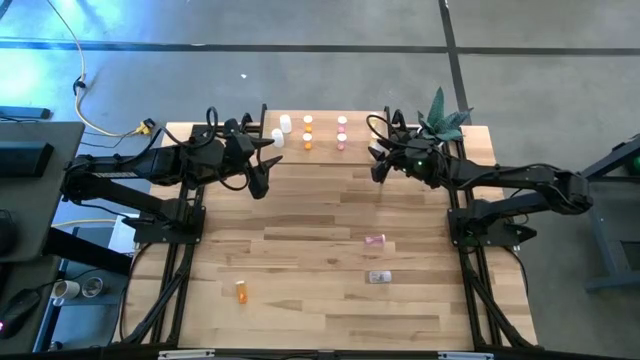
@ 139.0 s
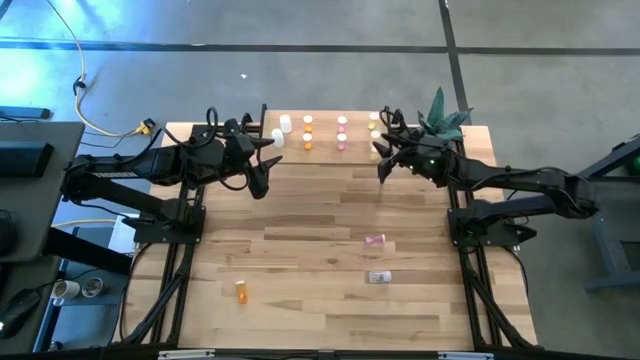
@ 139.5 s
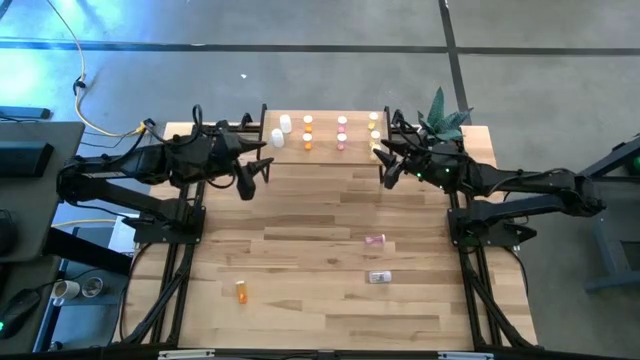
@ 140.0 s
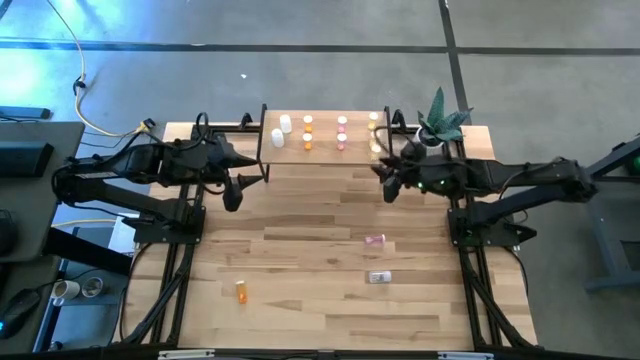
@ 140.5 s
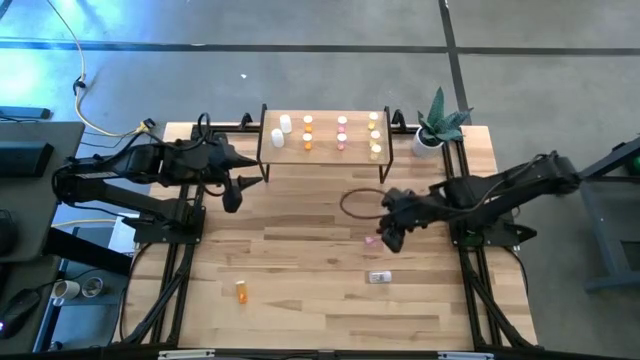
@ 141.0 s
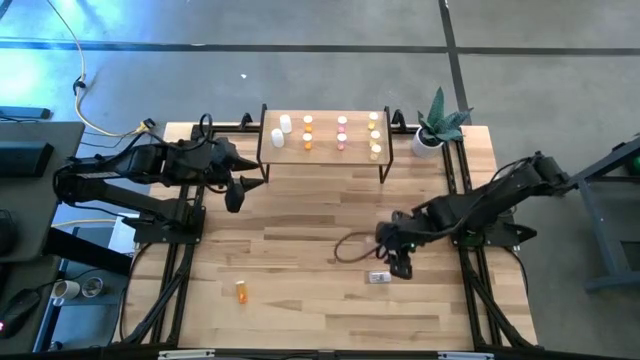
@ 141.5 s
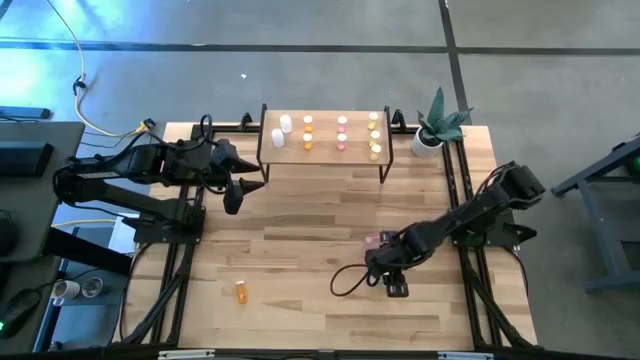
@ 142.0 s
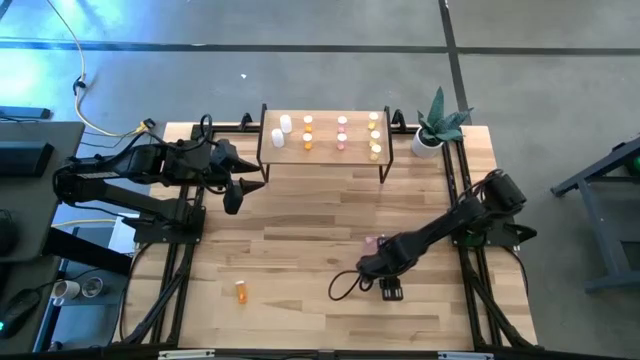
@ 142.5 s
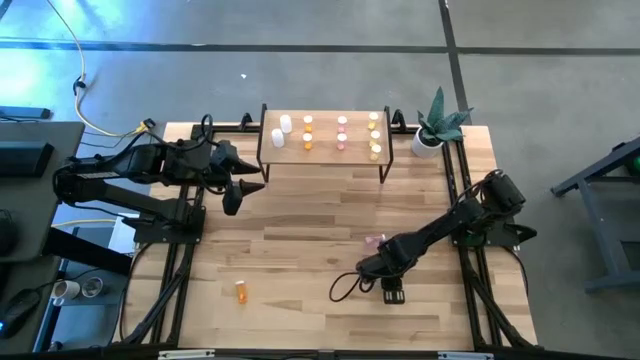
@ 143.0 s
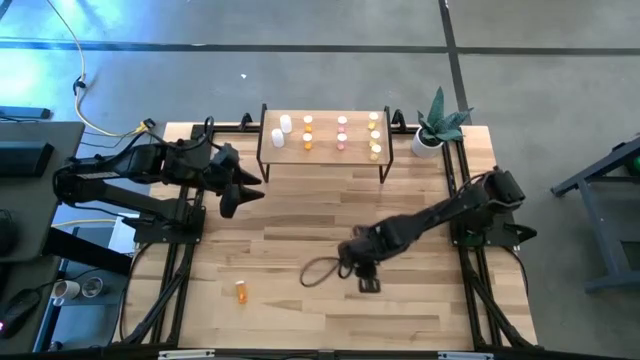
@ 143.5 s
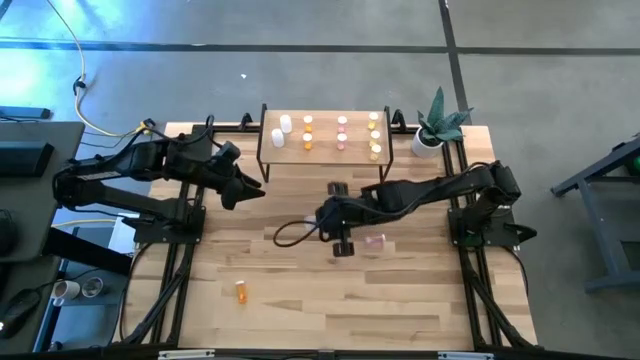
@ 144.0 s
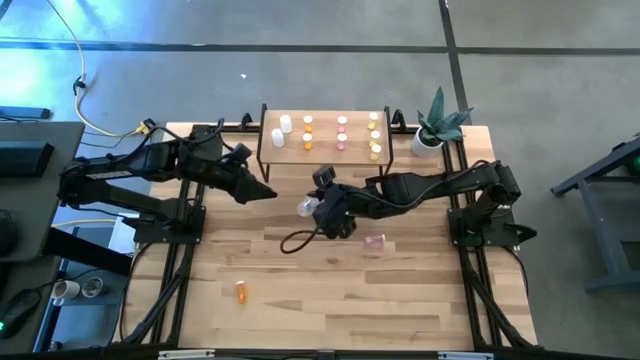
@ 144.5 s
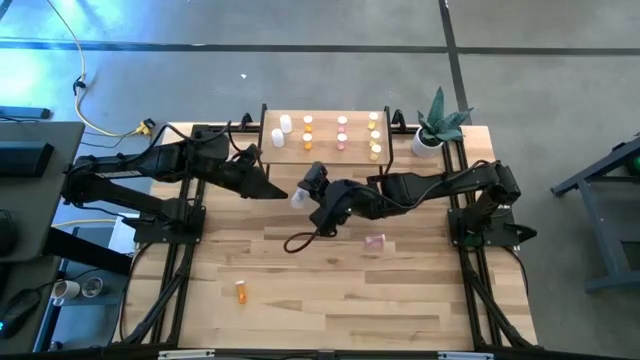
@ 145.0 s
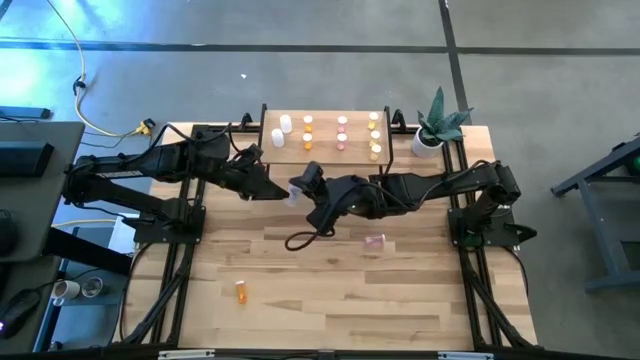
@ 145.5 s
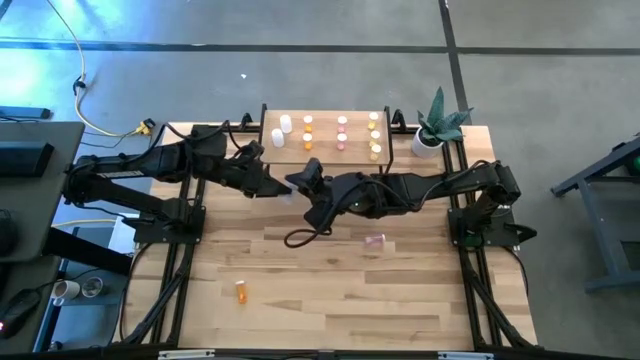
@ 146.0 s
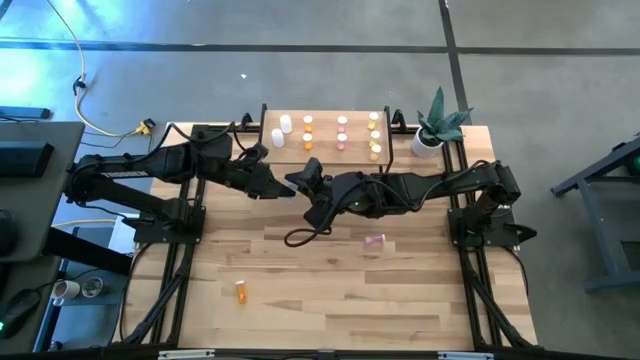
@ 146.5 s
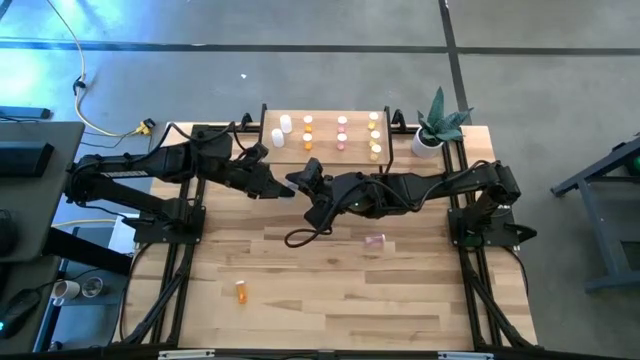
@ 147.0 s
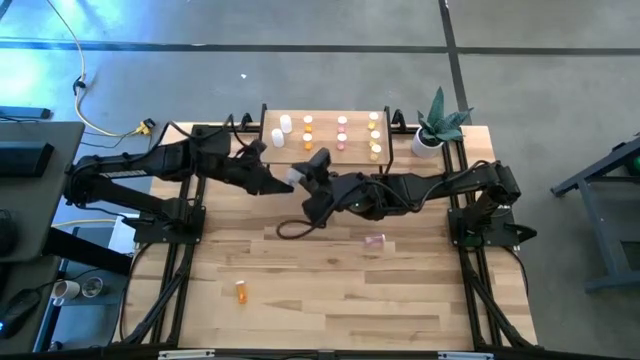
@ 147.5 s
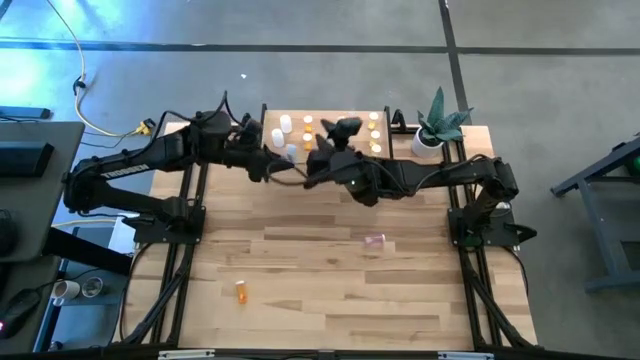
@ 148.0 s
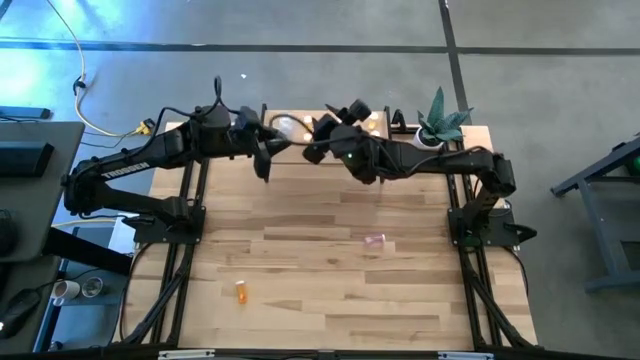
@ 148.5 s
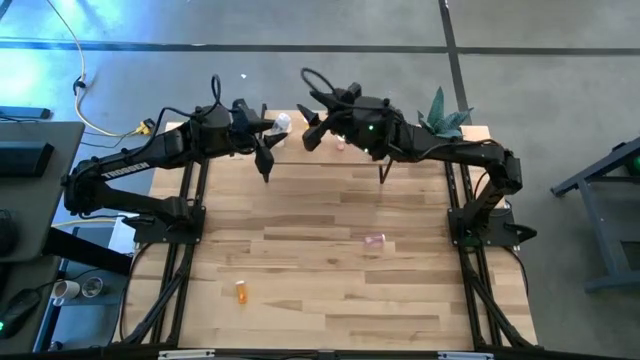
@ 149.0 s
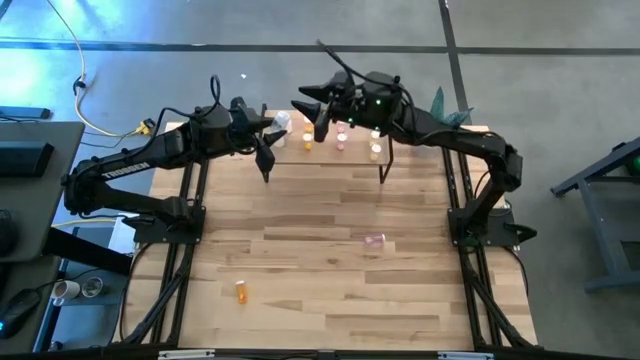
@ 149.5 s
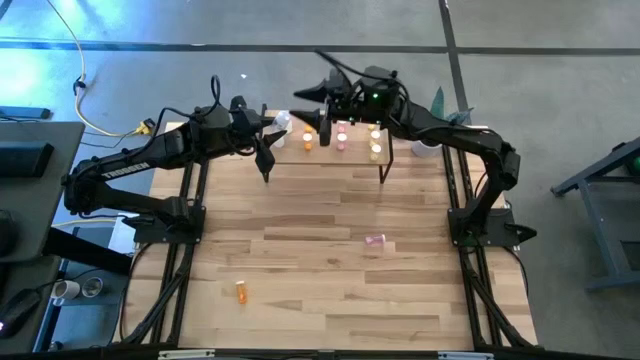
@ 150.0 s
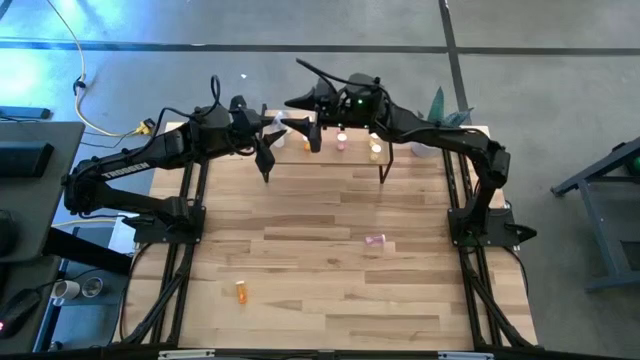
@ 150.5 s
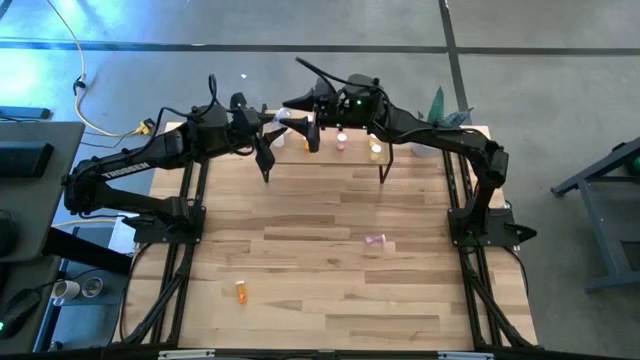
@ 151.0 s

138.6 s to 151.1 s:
Task: Pick and place medicine bottles onto shelf by color
Put the transparent pill bottle aligned with the other transparent pill bottles on the shelf

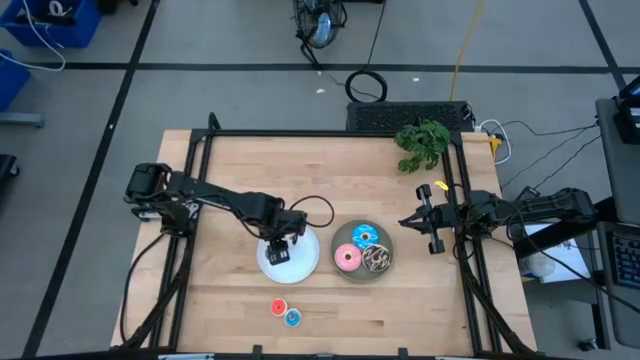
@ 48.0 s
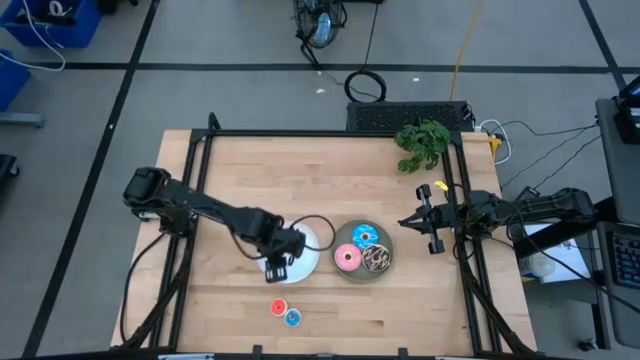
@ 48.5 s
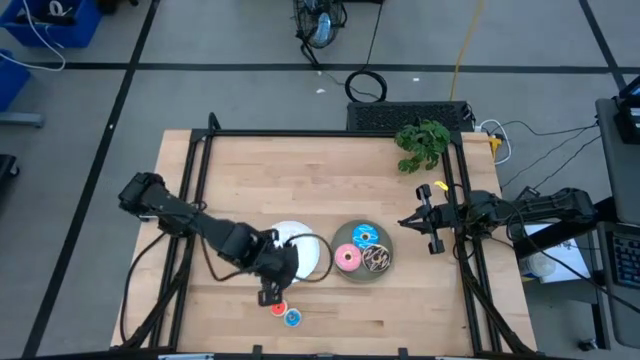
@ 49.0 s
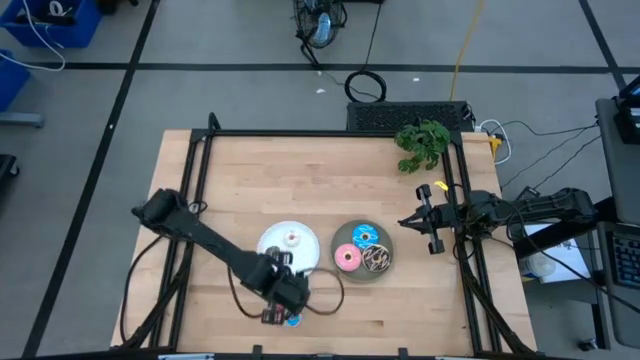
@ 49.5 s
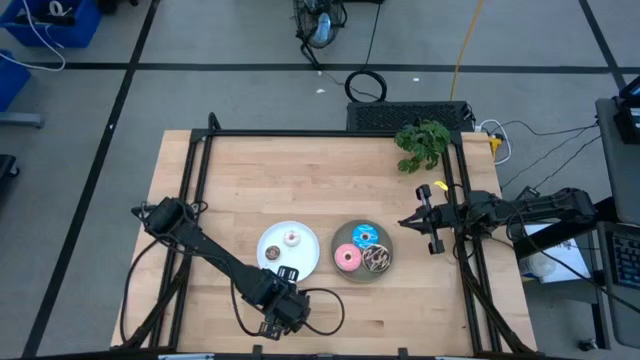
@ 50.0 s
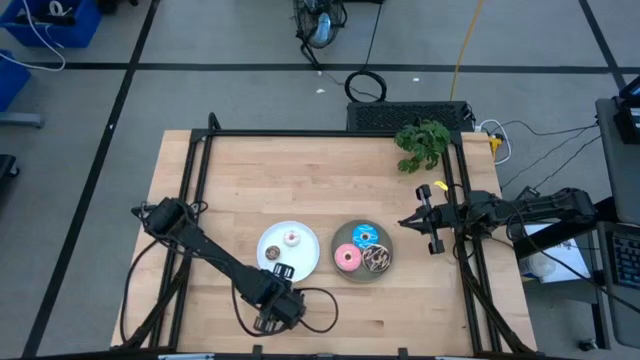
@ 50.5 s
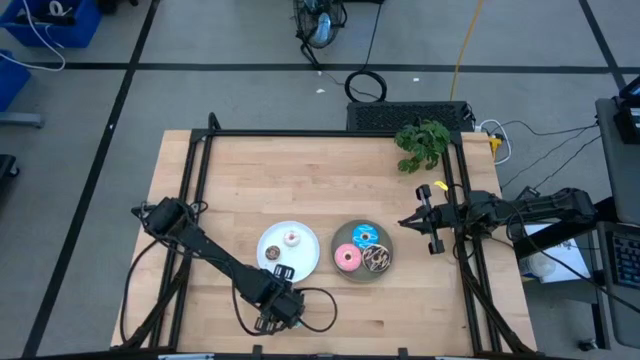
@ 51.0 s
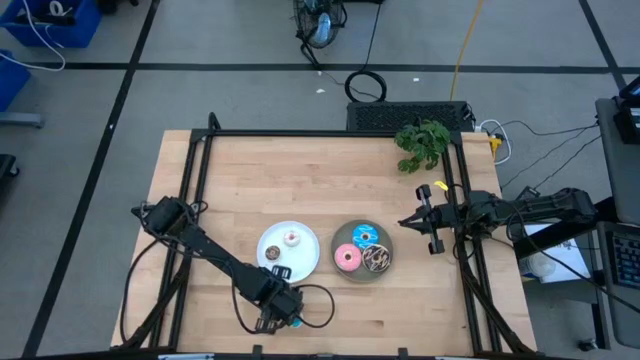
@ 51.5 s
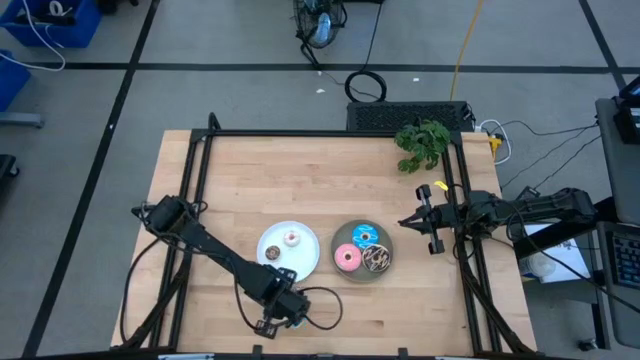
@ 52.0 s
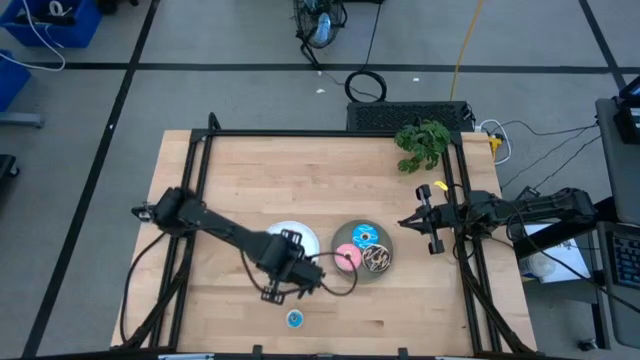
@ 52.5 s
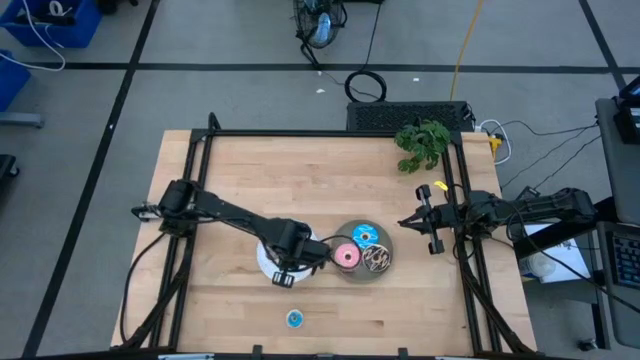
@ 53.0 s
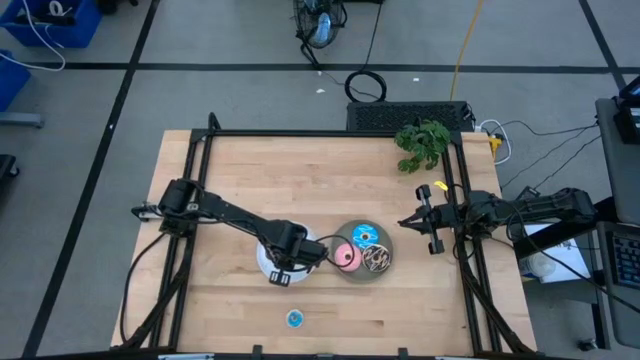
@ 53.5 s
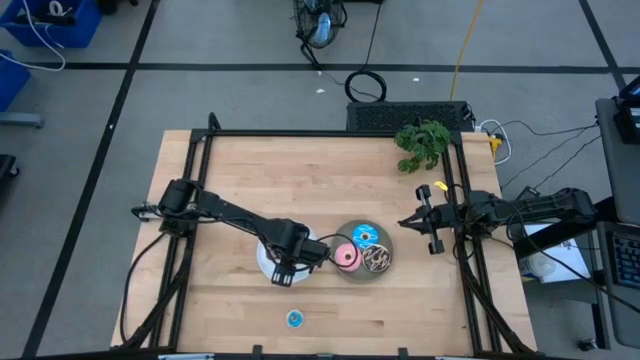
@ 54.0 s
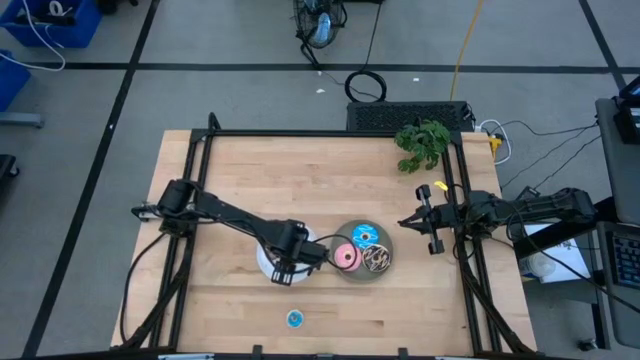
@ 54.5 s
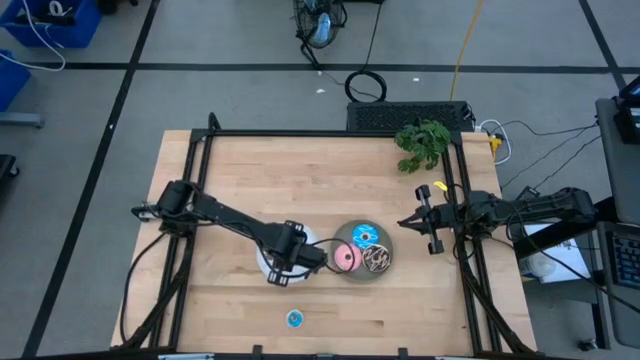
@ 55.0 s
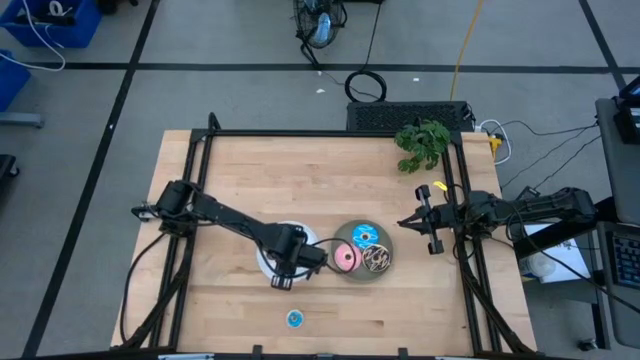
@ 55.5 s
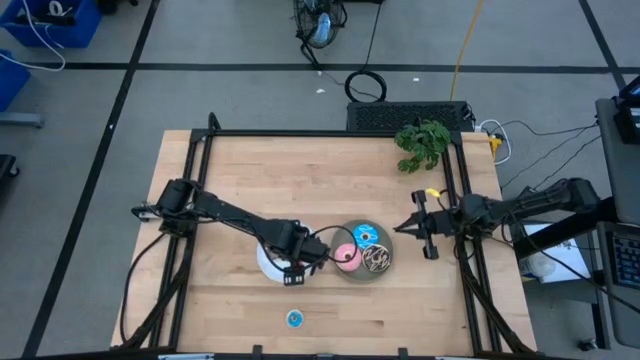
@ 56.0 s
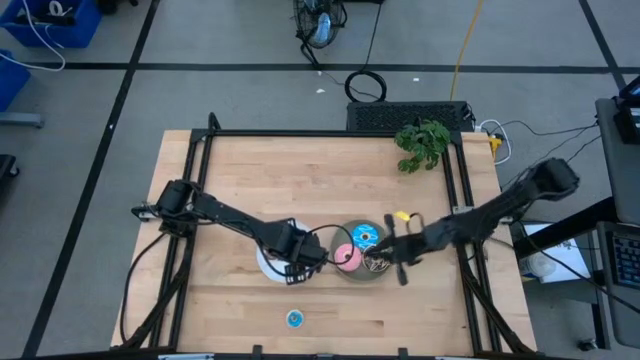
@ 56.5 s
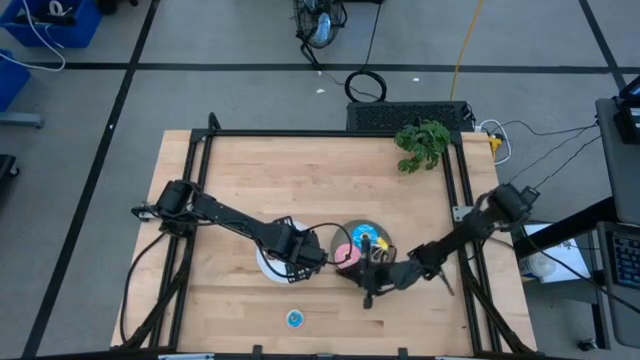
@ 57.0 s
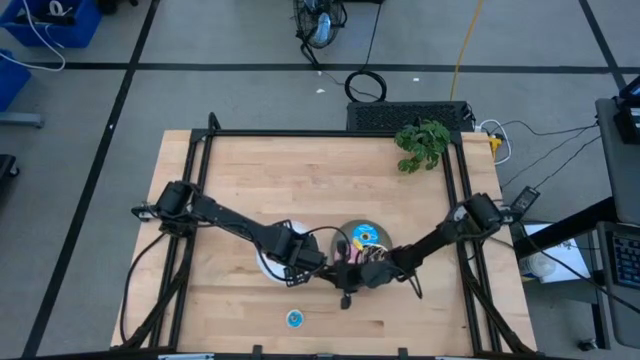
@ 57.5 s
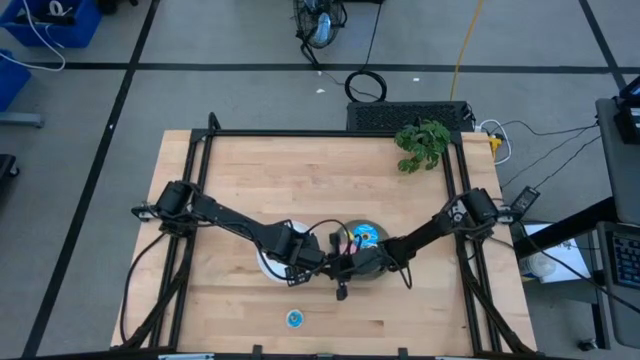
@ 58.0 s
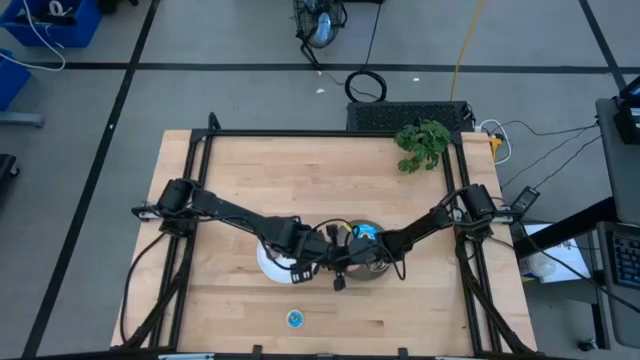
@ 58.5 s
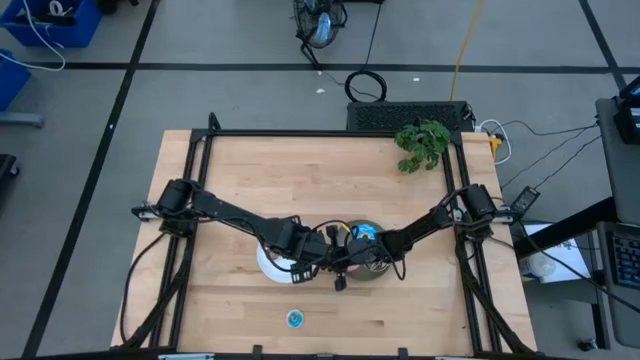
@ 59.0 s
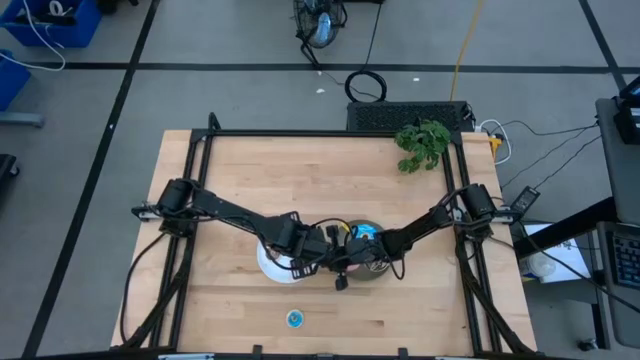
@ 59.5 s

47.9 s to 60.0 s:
Task: Pick & Place donuts
Put the small red donut on the white plate
